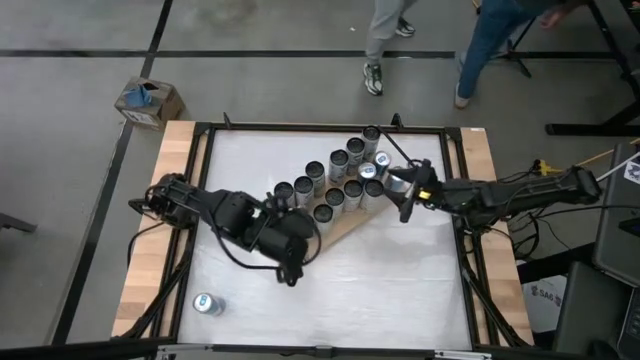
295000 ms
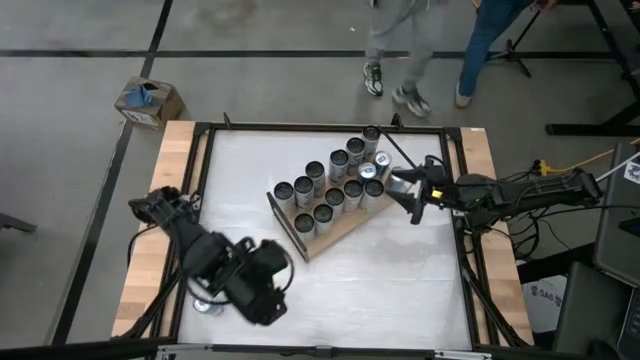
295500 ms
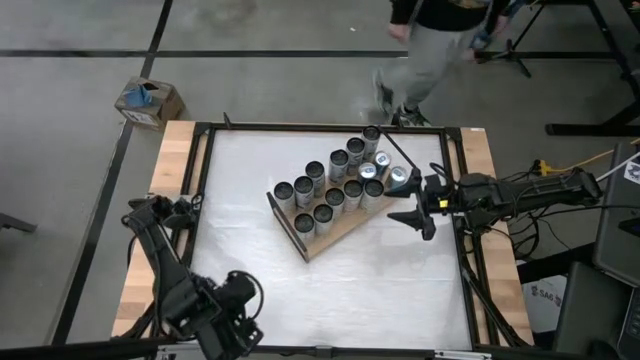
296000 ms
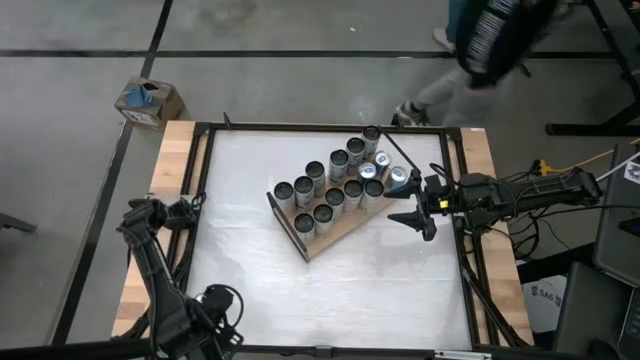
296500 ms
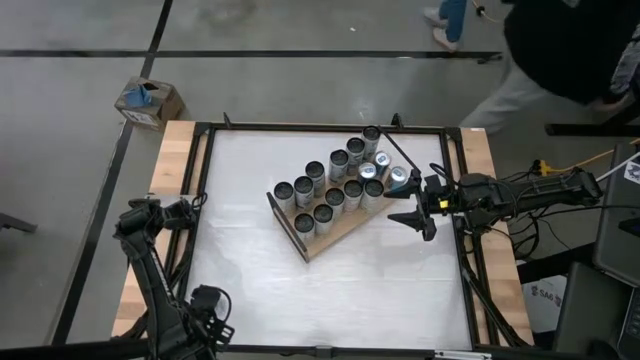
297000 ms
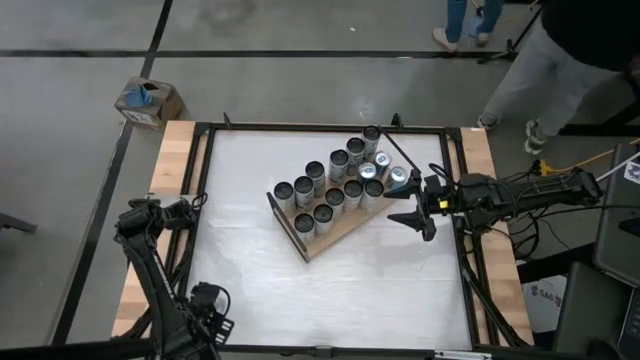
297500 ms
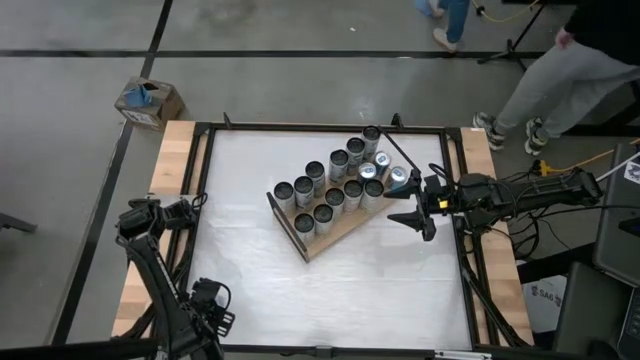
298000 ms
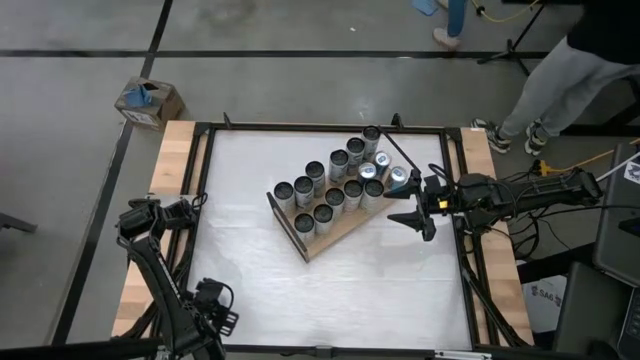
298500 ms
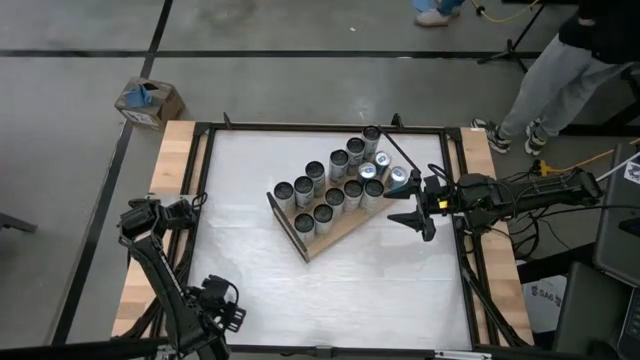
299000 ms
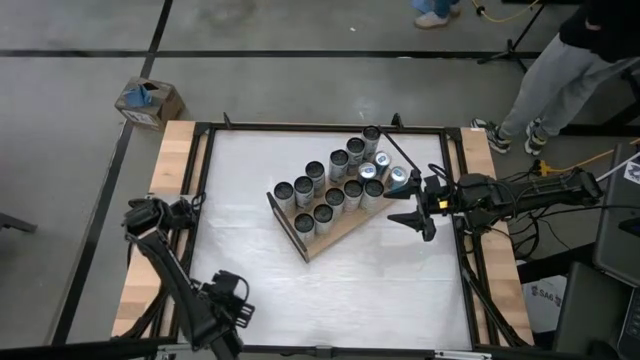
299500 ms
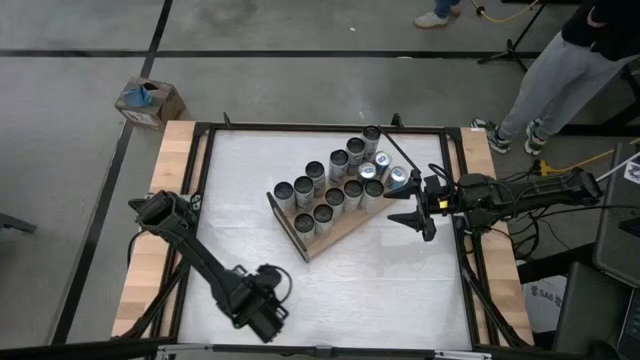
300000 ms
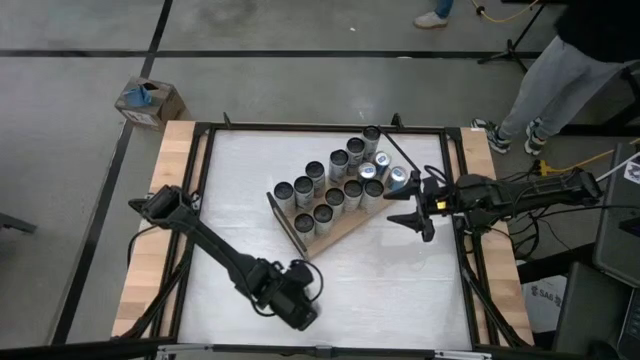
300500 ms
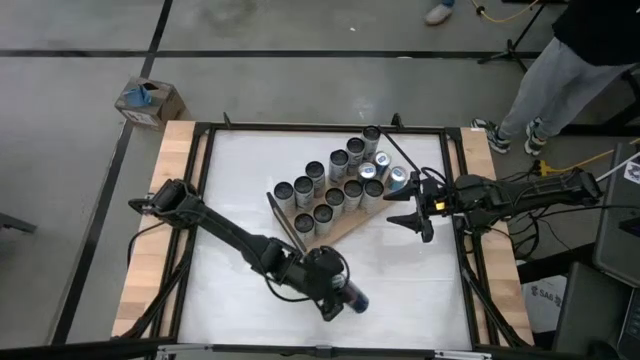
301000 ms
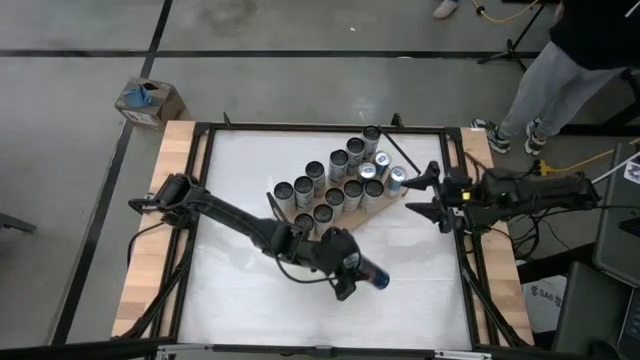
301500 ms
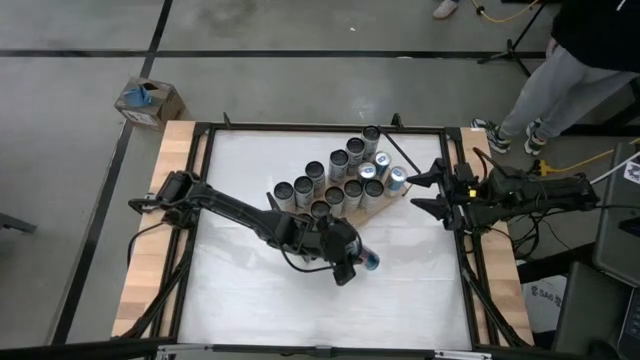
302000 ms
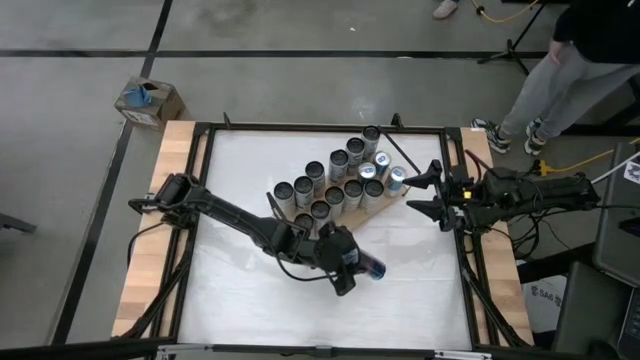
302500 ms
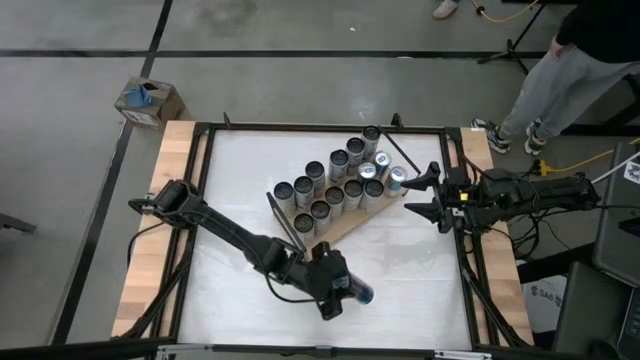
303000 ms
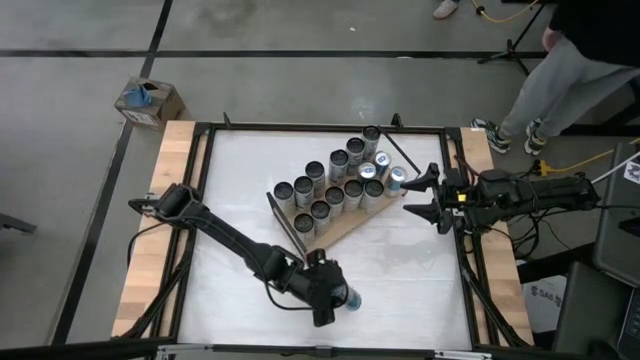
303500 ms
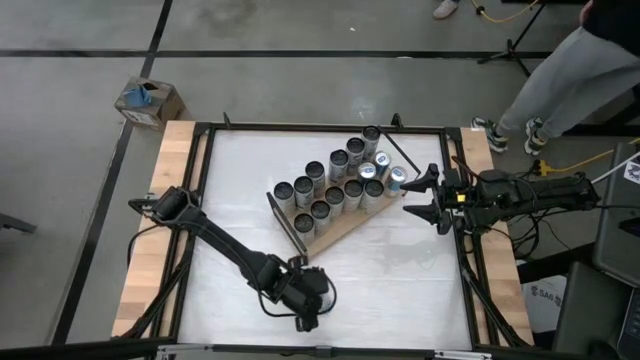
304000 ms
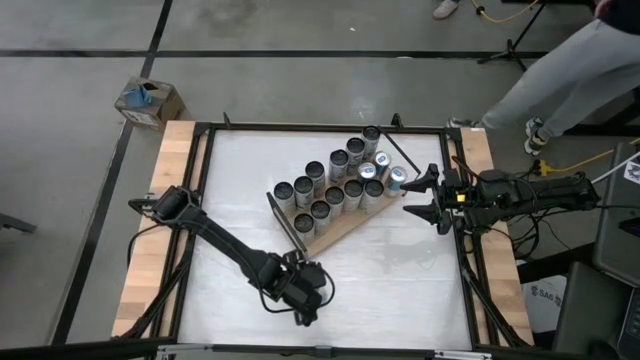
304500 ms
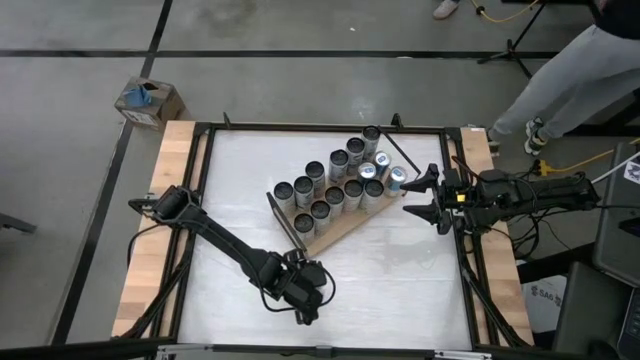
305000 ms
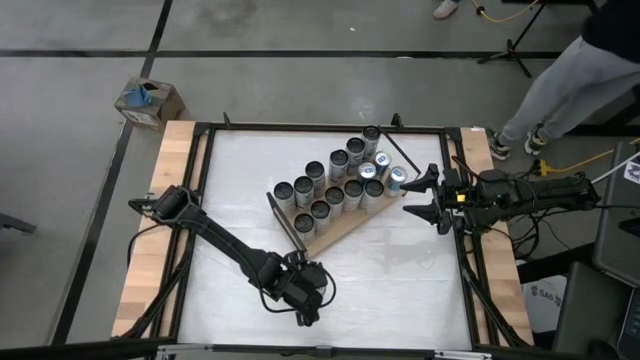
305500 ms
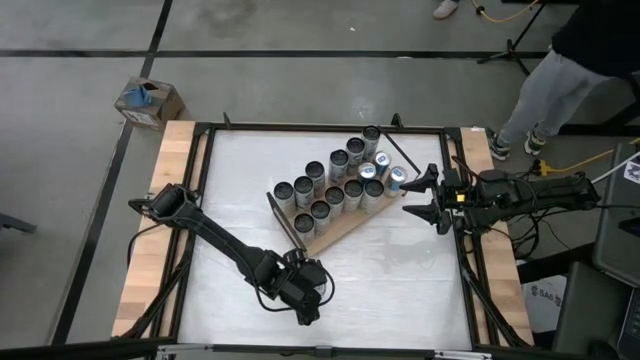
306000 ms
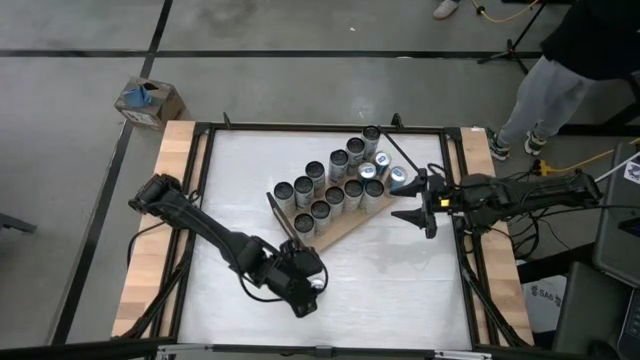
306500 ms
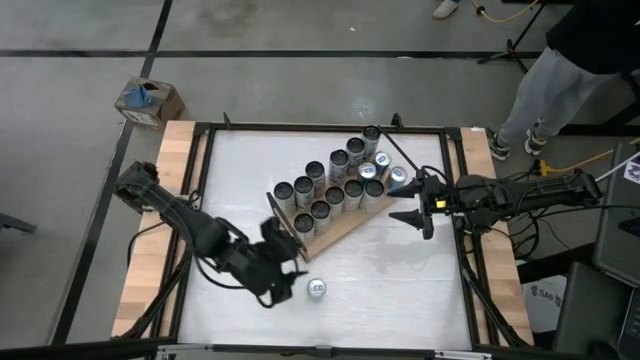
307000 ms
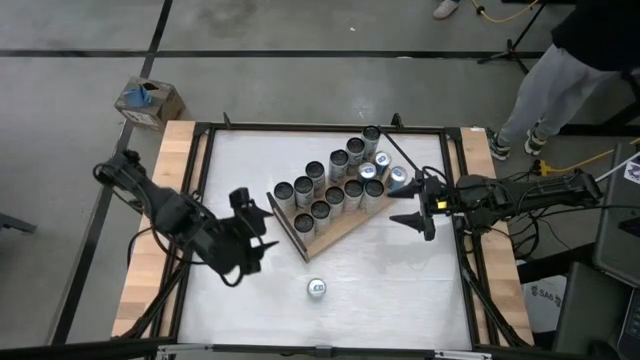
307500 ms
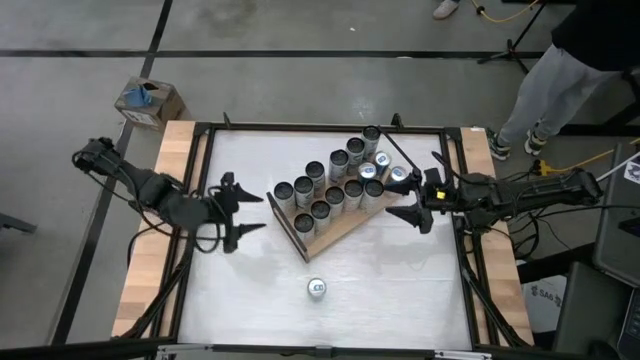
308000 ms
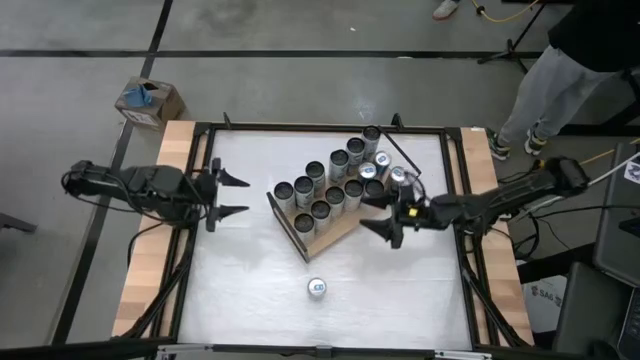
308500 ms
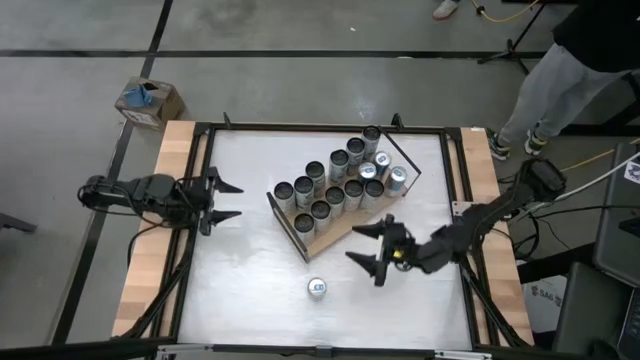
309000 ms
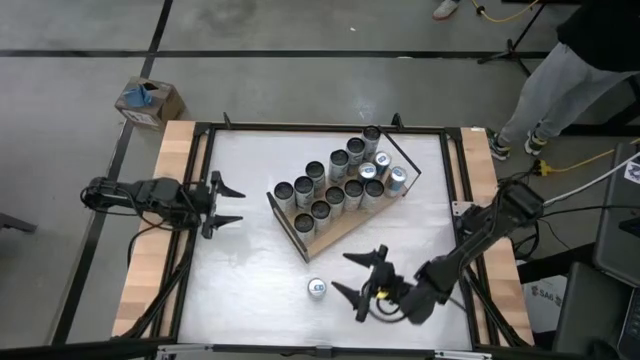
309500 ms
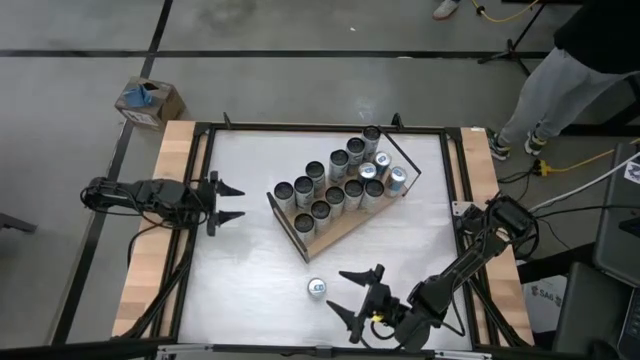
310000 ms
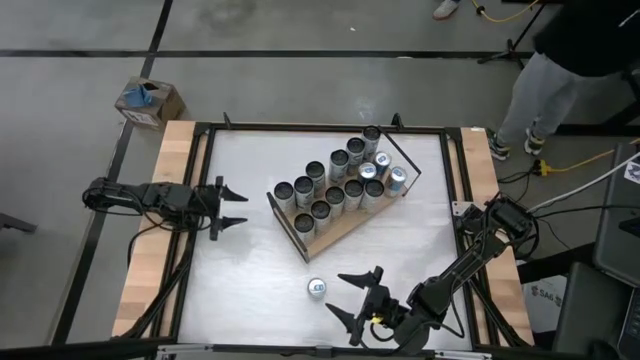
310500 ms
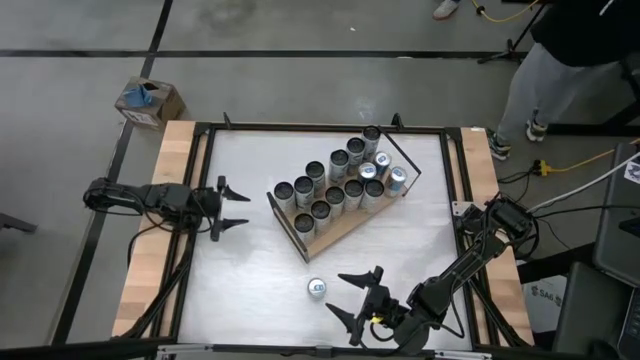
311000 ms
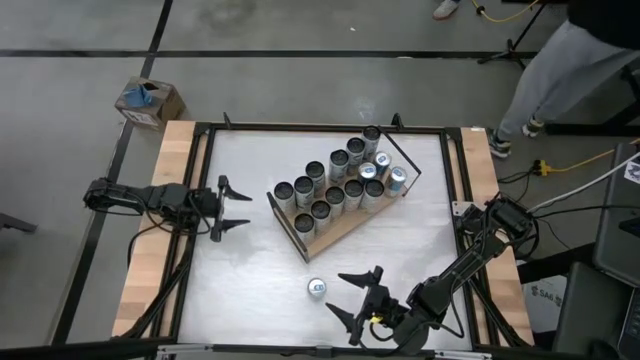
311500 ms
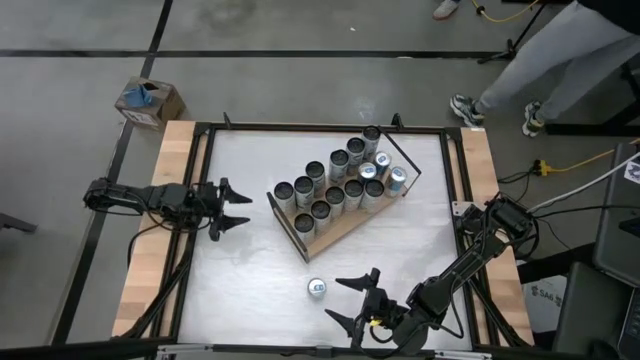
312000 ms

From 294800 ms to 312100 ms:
Task: Place canned beverage on shelf
Put the blue soda can on the shelf

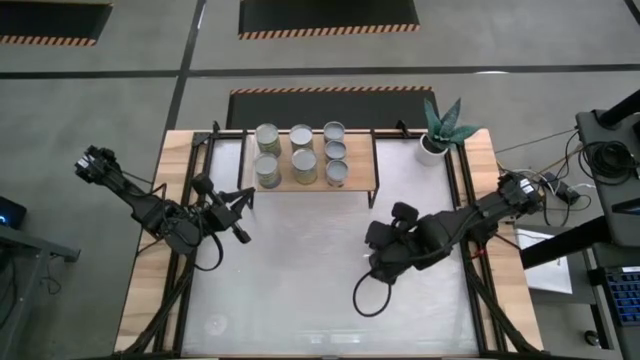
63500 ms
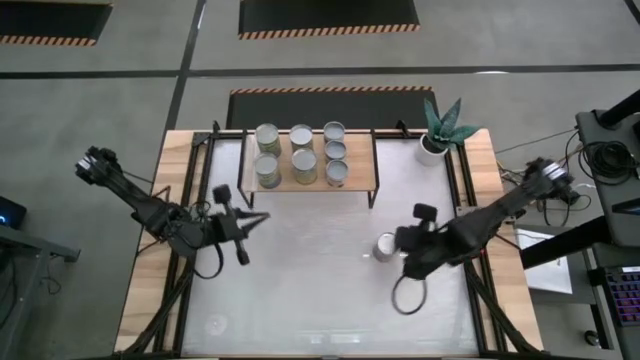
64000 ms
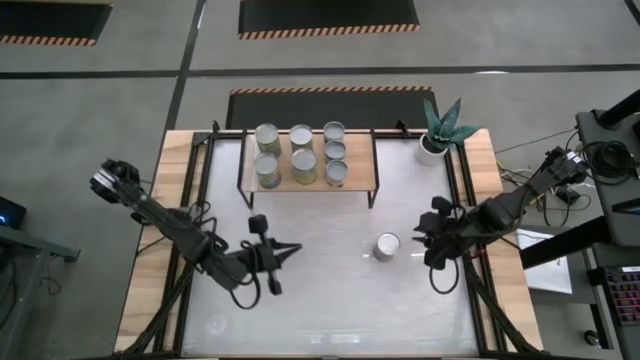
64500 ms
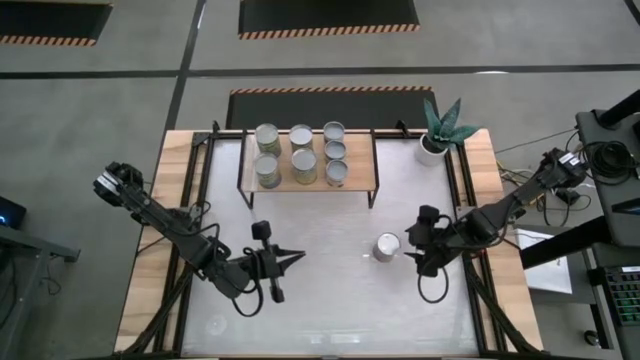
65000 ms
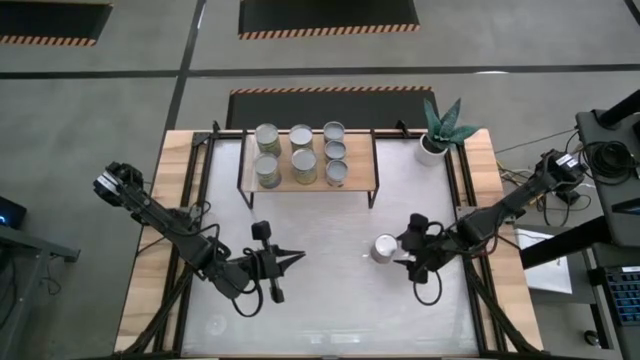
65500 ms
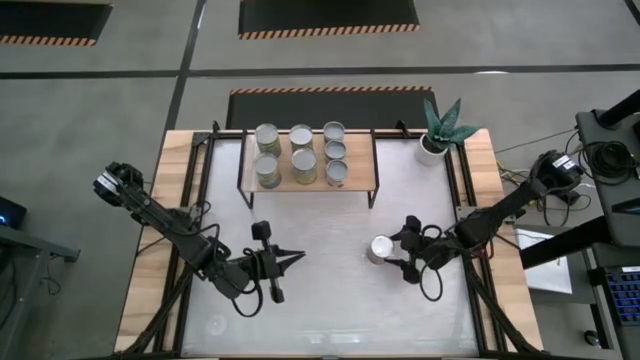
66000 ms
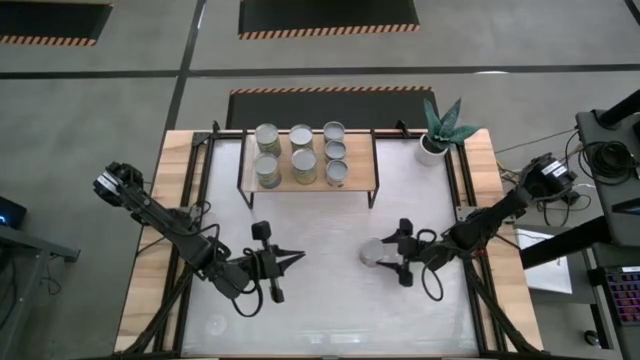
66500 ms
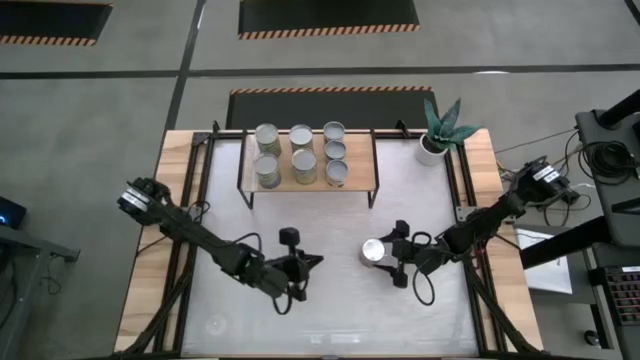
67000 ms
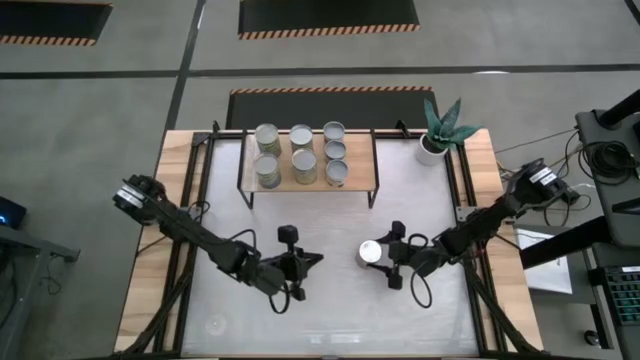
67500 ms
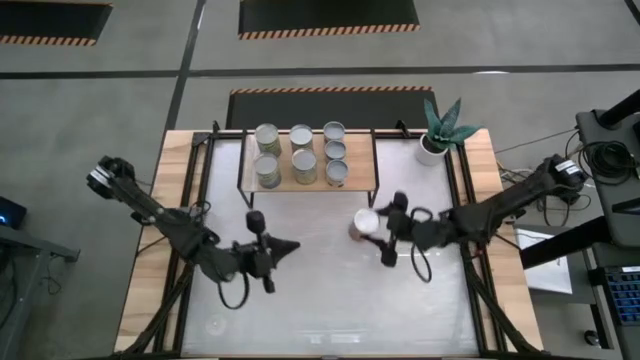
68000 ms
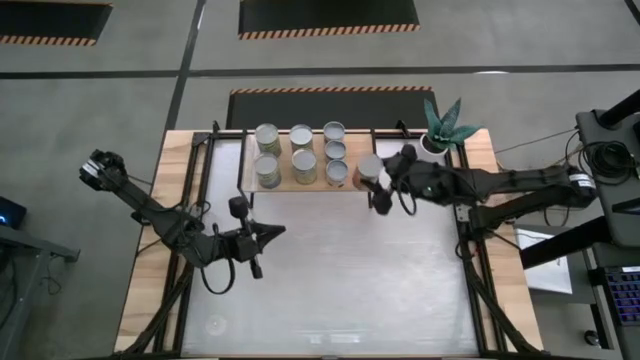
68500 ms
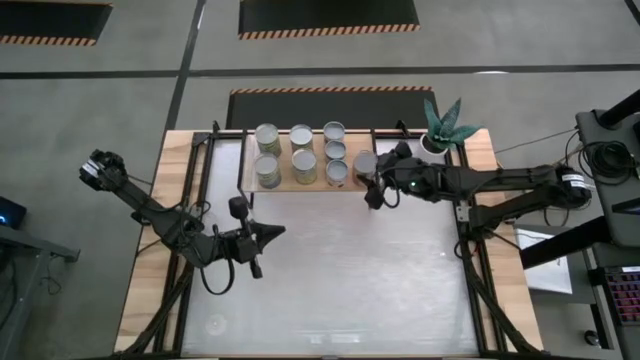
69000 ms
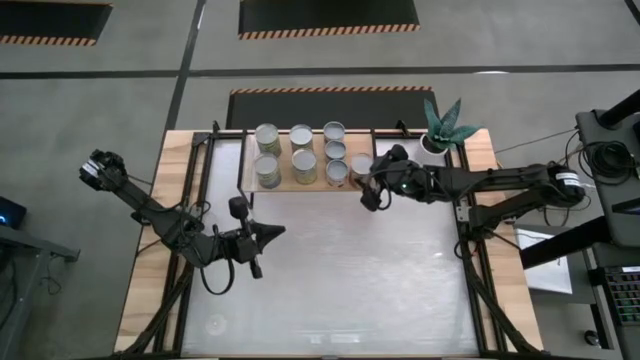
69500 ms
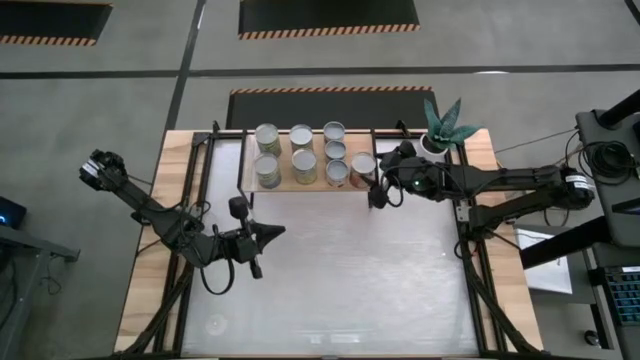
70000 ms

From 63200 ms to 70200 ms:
Task: Pick and place cans onto a shelf
Put the canned pineapple on the shelf
